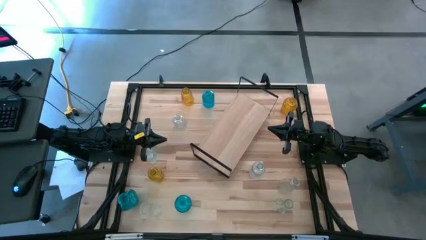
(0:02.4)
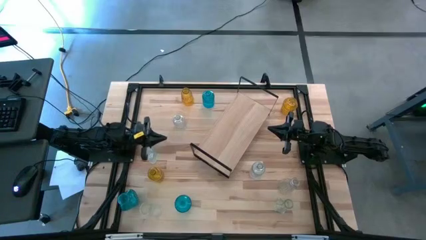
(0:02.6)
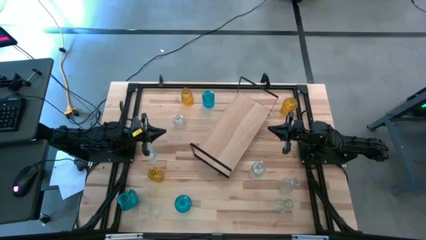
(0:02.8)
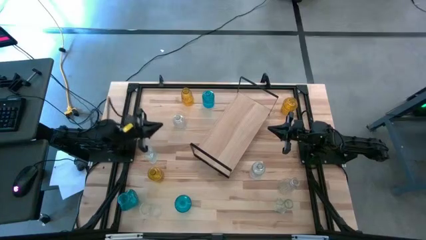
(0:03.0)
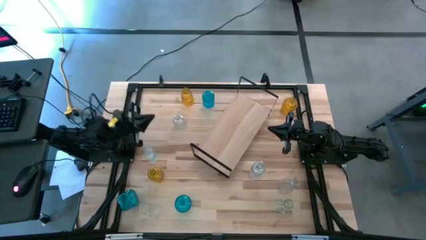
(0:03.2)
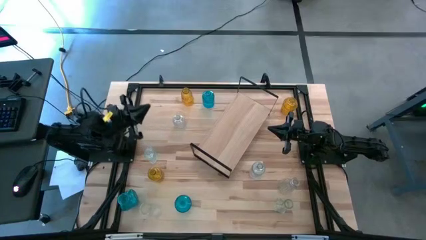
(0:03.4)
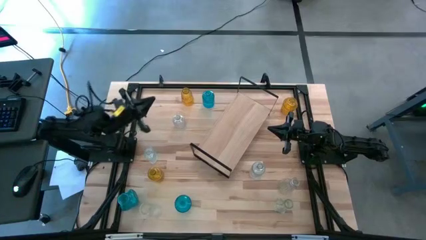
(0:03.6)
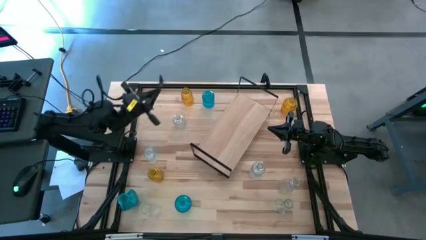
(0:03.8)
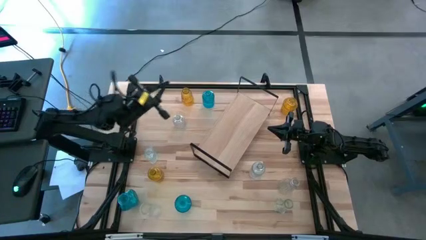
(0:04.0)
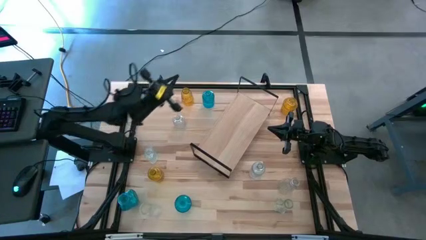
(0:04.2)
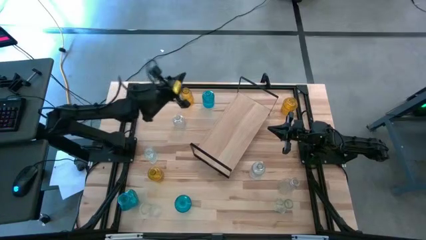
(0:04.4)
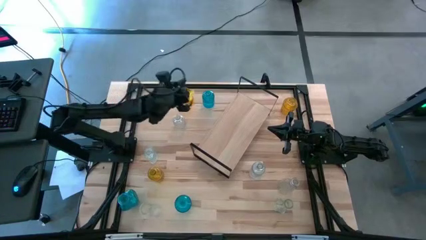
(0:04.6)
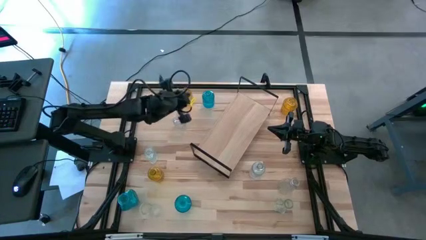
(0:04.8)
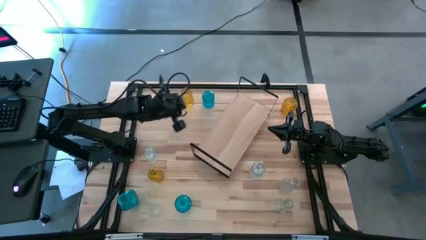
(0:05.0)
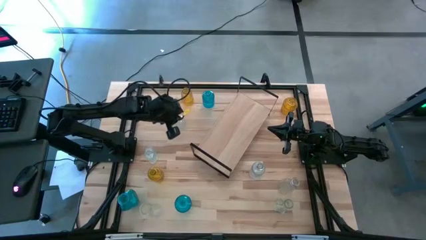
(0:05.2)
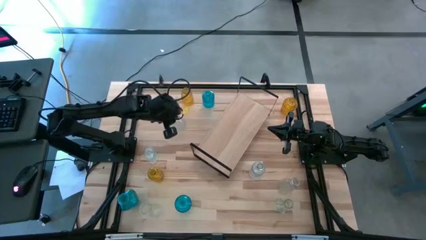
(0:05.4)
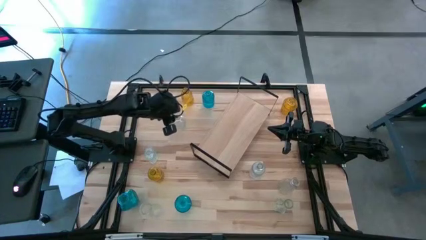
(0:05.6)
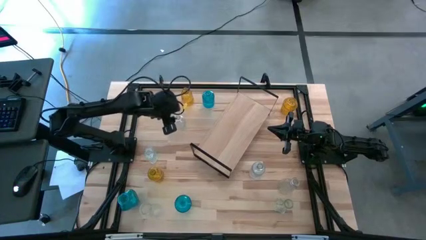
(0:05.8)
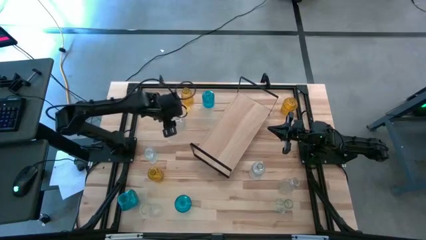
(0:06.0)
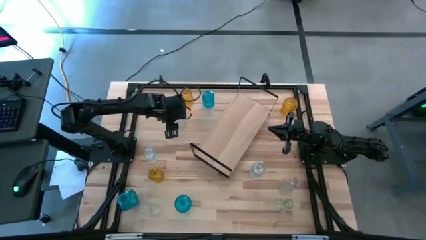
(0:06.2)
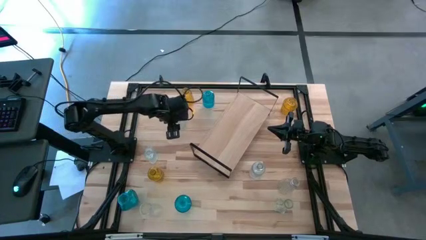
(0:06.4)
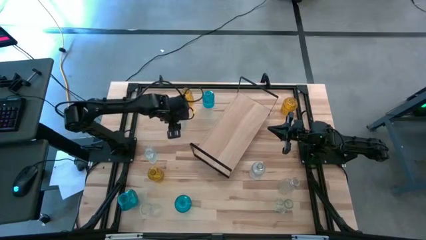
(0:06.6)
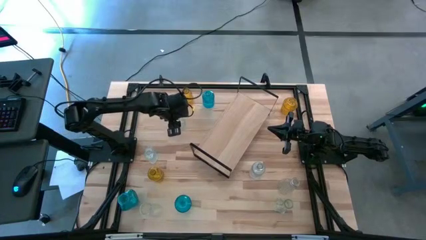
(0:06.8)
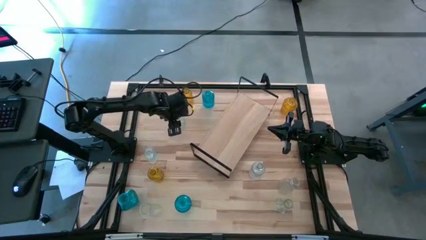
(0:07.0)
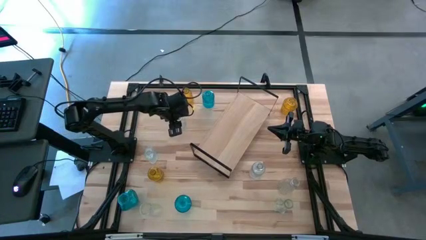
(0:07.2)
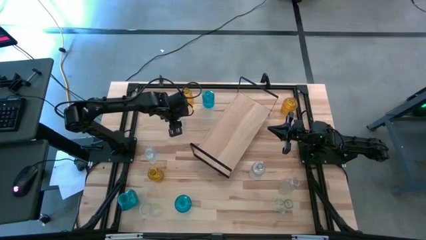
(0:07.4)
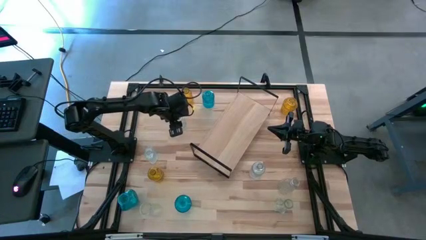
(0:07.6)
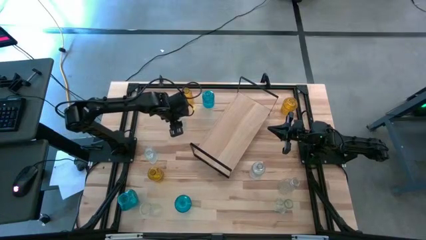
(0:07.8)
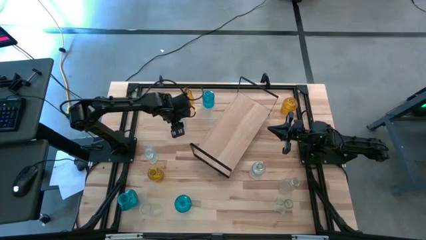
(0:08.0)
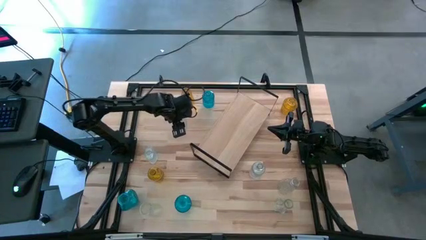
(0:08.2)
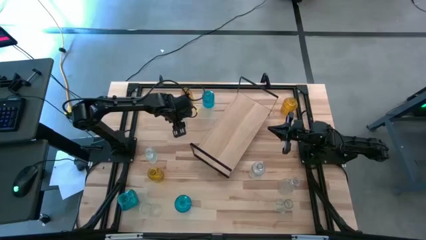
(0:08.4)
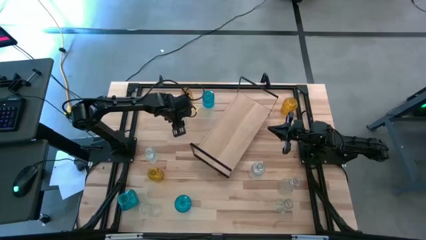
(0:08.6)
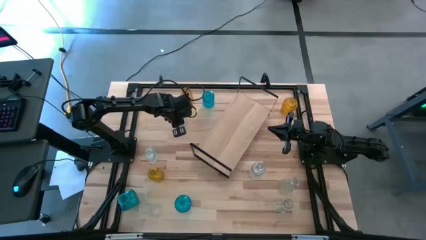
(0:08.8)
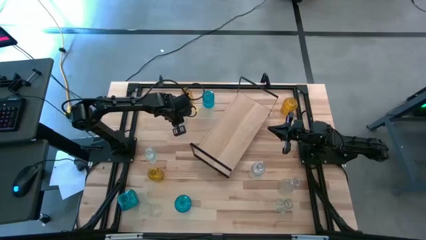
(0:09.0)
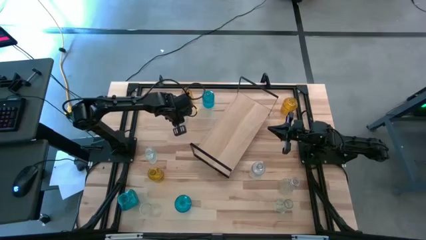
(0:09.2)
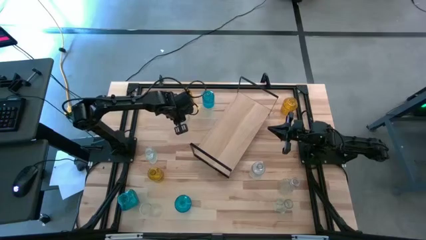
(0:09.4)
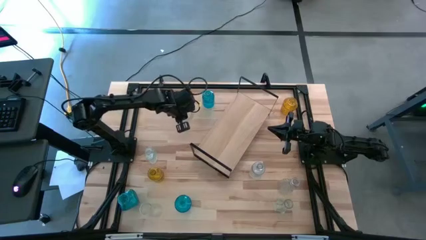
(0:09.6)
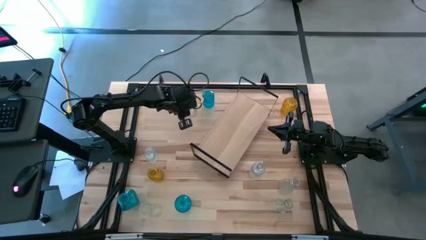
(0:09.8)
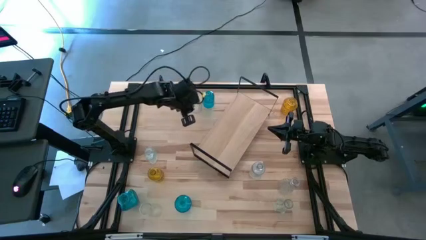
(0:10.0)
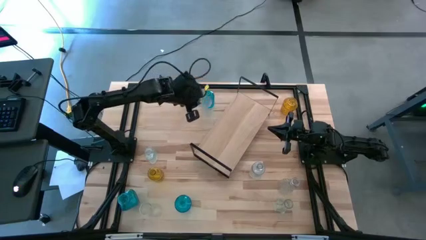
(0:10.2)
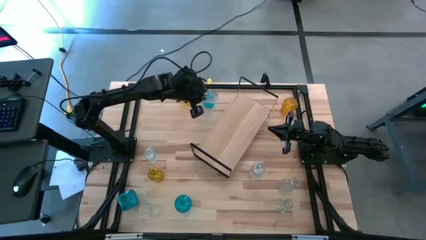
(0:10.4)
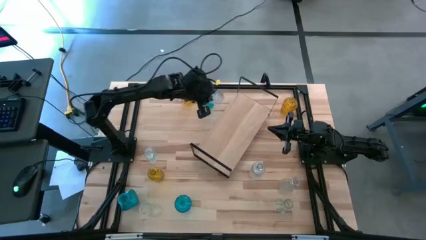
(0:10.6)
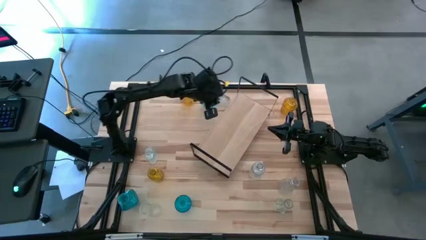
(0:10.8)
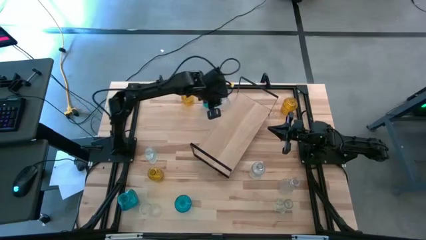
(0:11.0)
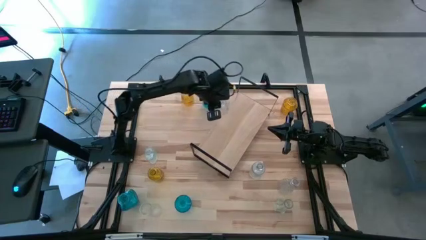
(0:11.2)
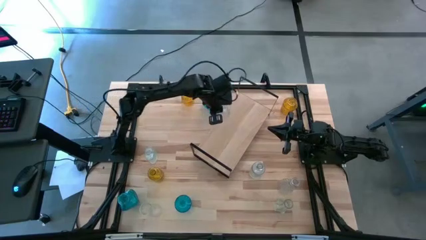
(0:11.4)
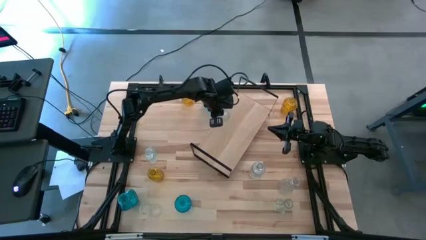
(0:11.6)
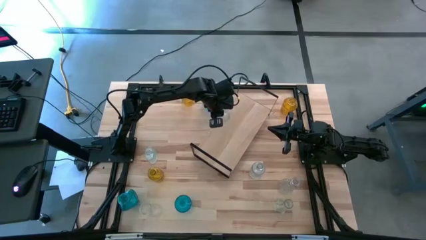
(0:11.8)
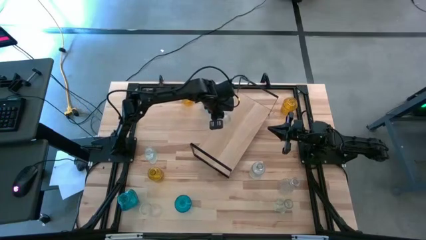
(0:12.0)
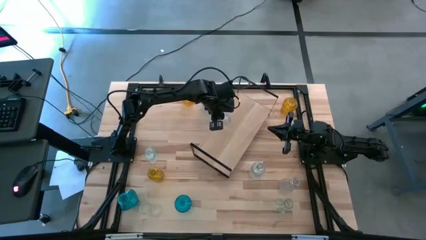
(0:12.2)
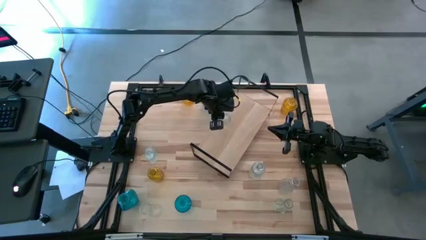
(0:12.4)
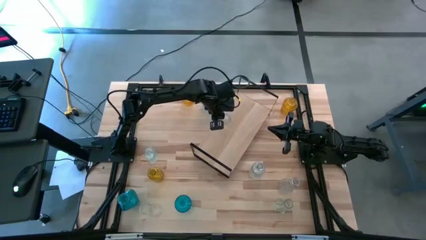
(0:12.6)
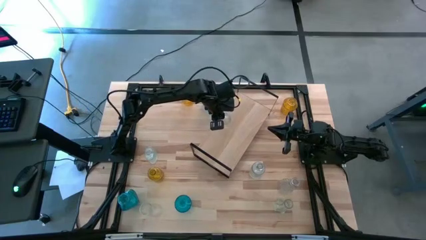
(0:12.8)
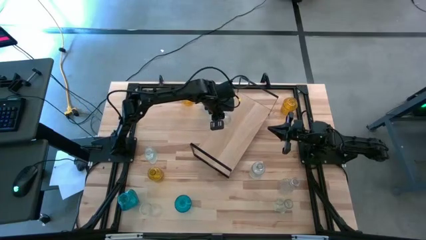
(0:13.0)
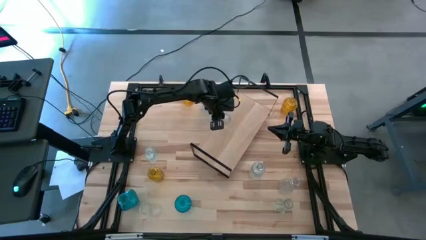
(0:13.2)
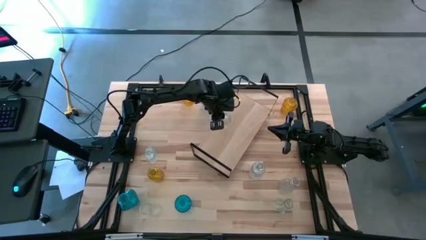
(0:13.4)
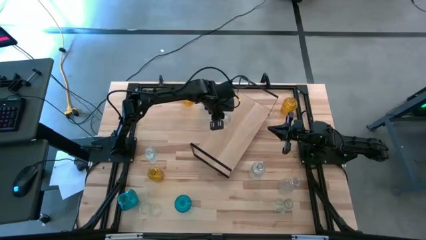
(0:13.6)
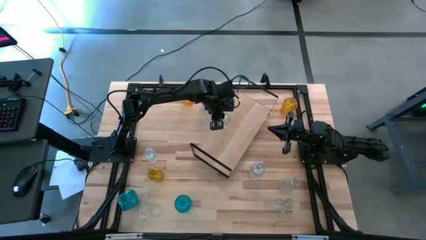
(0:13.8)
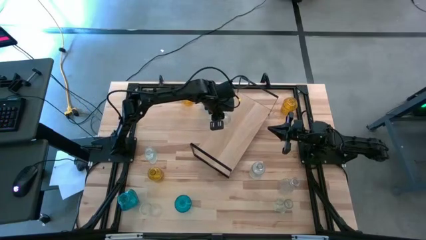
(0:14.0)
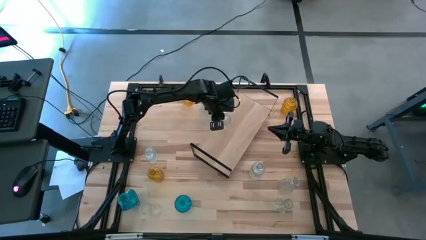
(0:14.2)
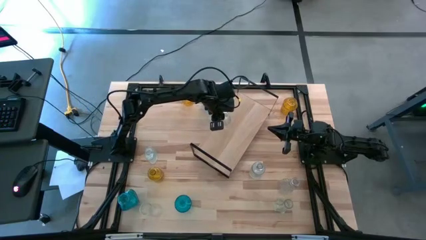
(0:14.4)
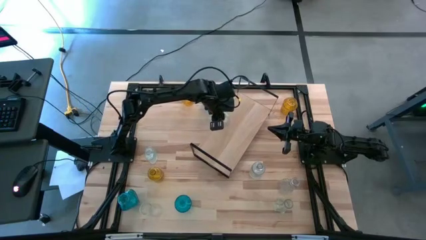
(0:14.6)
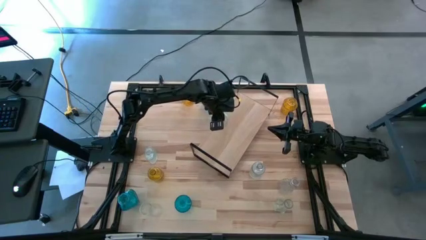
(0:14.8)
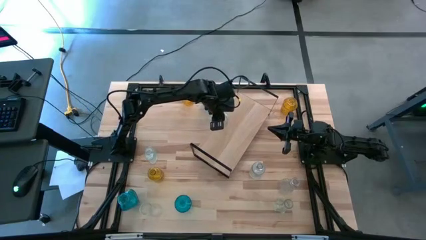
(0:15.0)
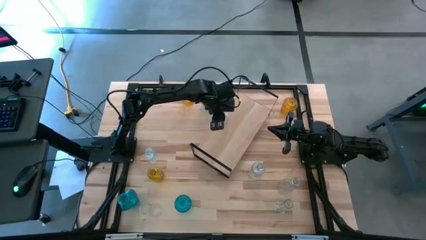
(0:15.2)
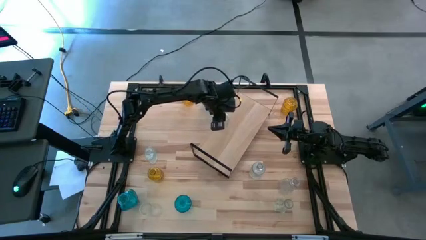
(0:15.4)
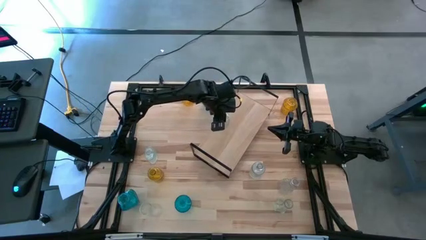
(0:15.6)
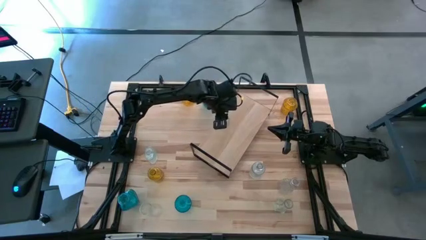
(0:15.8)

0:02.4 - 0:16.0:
Task: sort vases onto shelf
Put the top left transparent vase on the shelf
